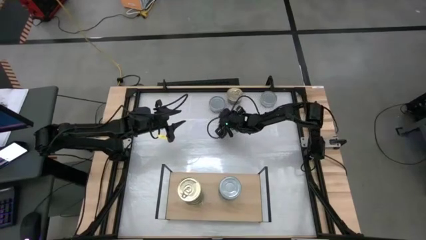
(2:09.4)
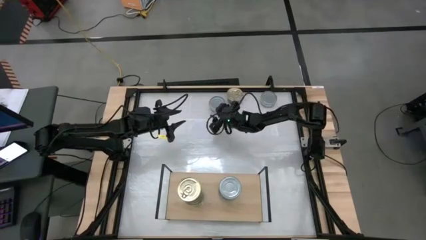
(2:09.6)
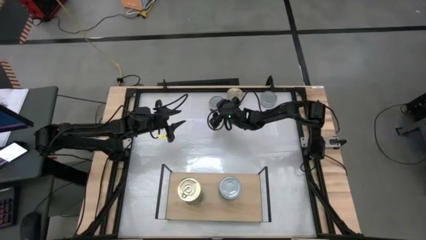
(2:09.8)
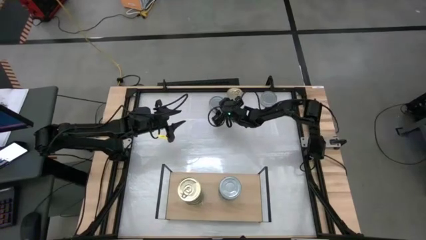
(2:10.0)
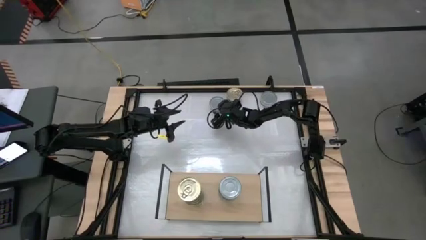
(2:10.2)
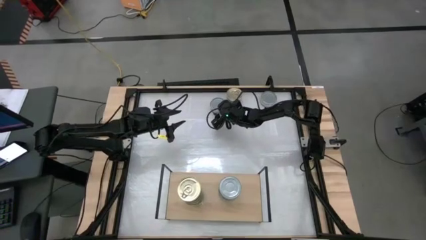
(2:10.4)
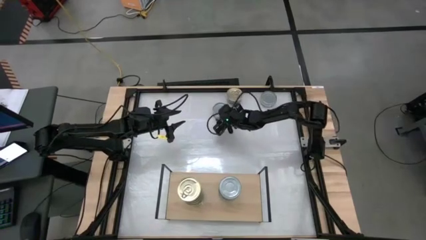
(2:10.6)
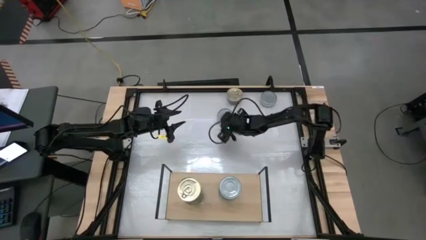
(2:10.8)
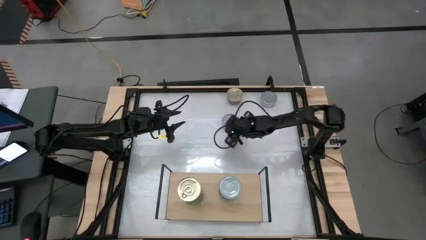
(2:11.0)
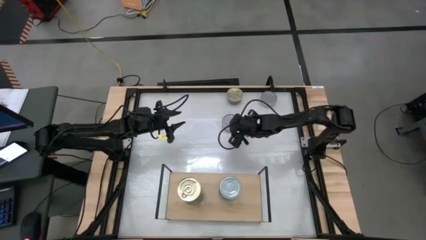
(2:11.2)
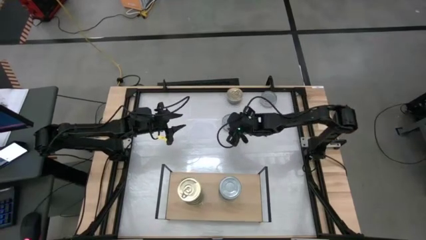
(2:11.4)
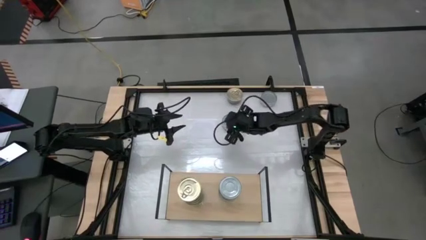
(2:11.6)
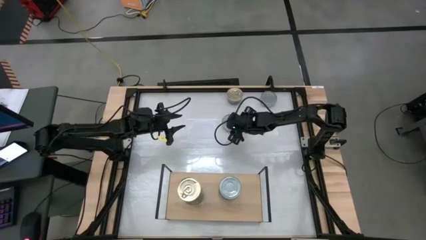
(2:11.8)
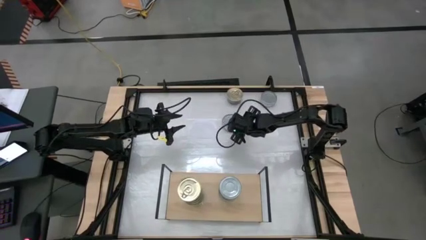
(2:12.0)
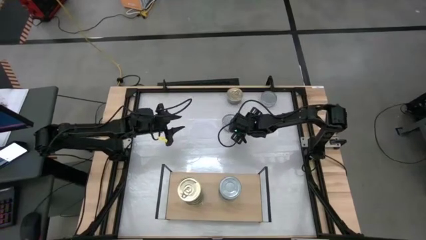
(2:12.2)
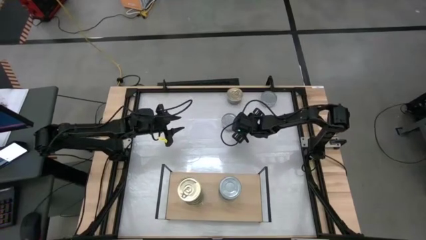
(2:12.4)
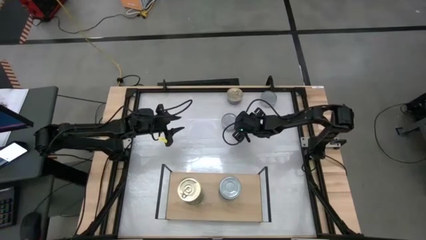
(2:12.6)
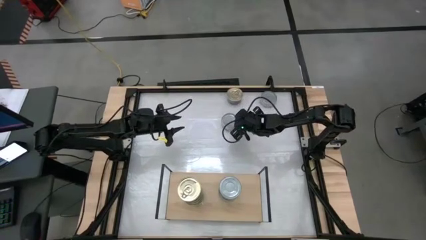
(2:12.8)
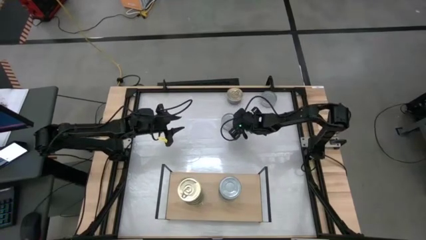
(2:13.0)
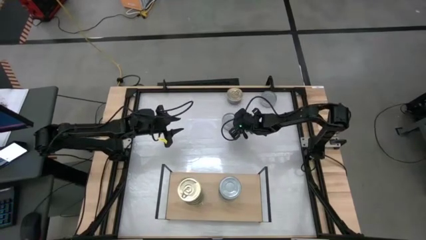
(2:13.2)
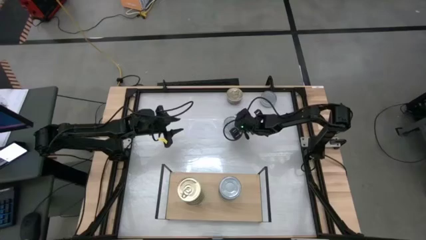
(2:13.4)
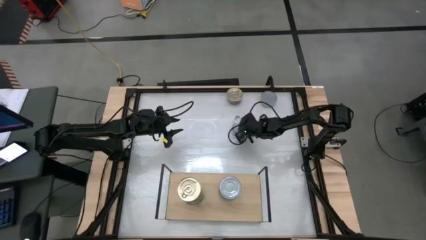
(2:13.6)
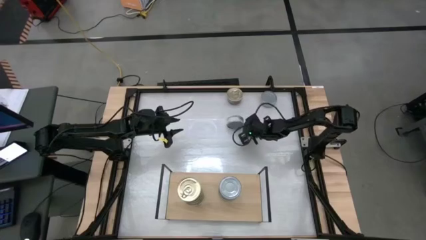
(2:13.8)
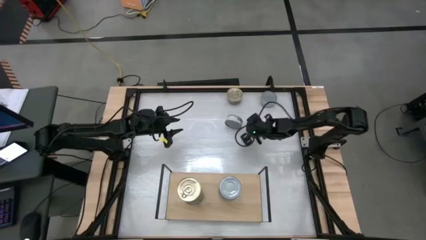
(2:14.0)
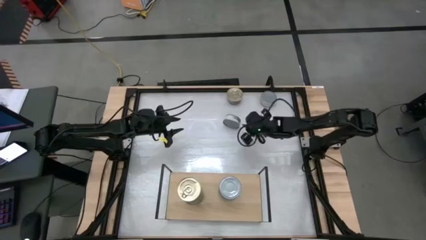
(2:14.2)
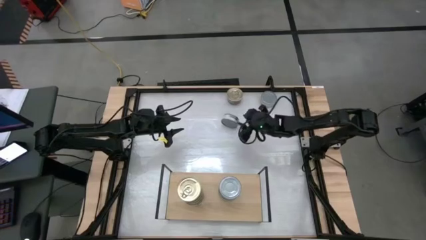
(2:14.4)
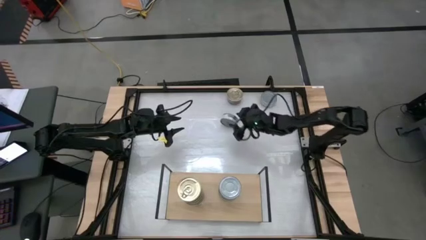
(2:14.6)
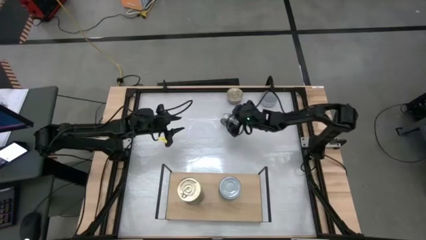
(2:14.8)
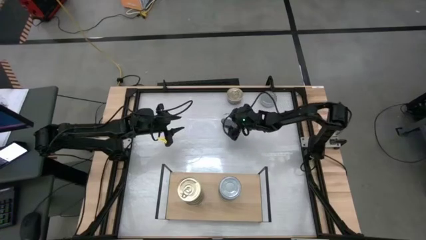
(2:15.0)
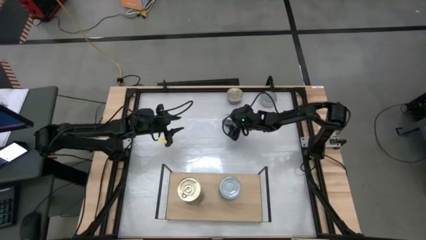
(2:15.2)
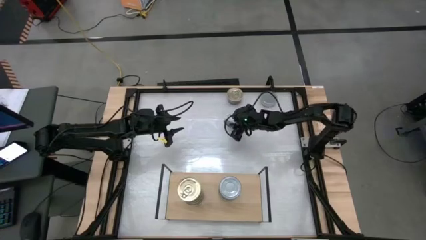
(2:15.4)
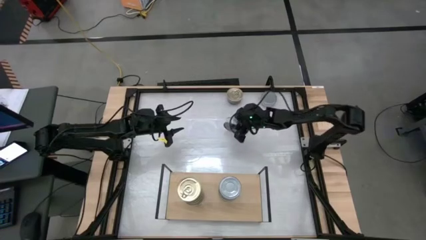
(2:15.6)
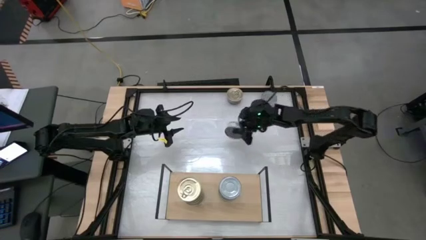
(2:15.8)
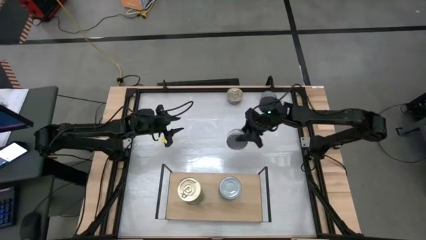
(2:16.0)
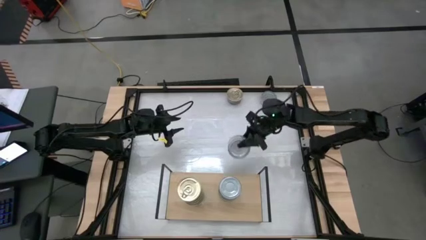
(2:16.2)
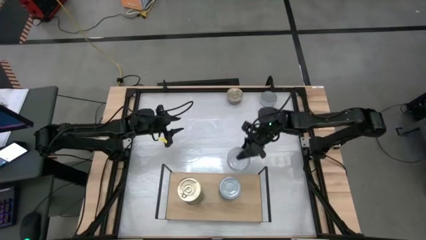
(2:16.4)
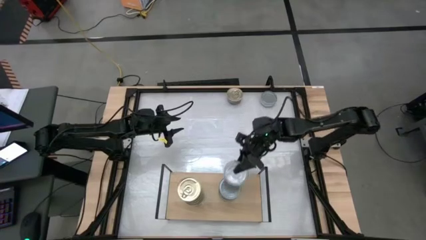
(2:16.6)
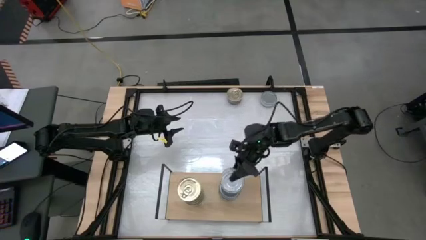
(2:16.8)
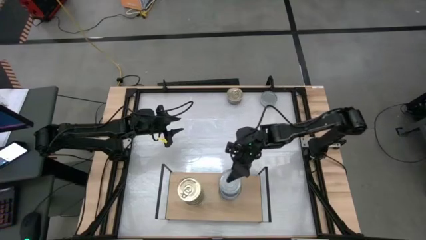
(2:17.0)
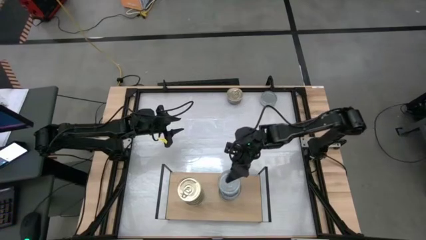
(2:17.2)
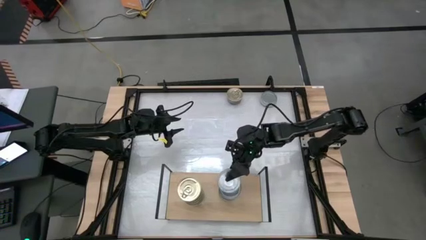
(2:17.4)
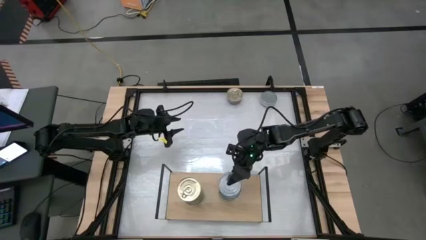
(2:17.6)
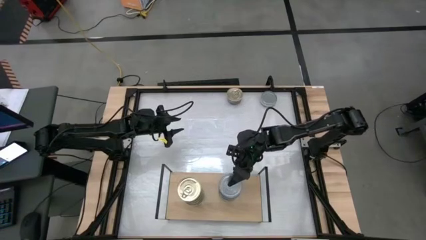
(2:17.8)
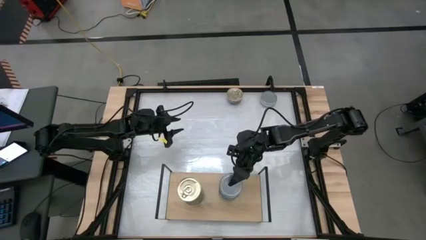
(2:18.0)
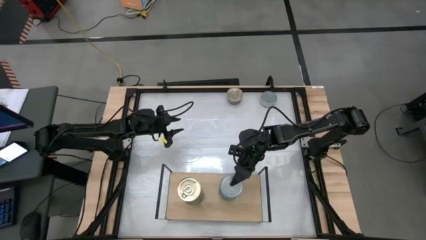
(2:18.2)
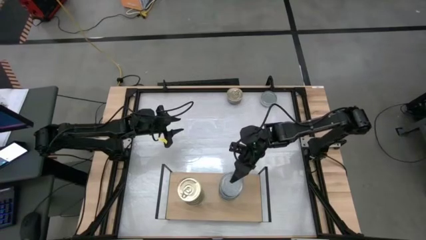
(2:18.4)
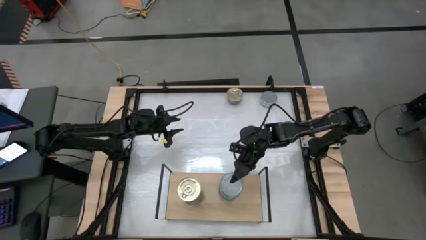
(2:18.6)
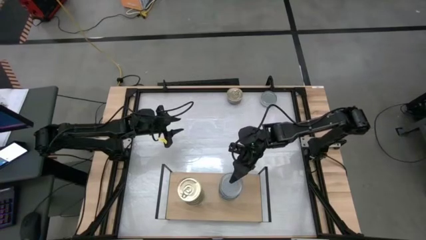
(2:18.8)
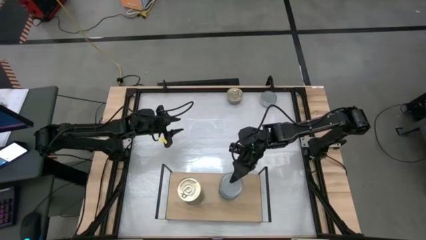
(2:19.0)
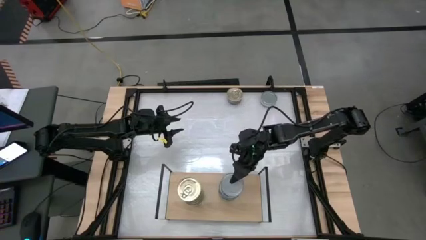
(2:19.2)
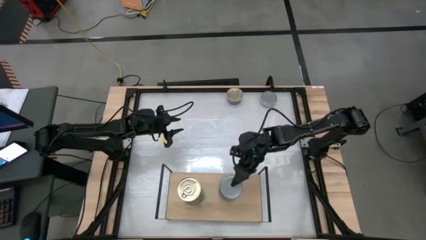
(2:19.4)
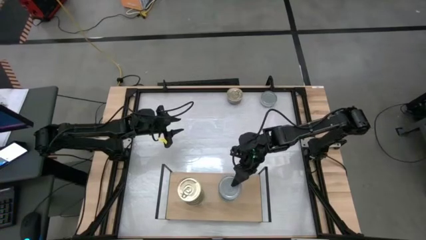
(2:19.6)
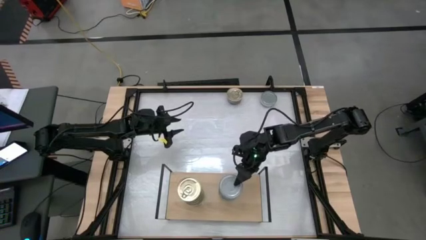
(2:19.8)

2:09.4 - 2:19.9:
Task: Stack canned seafood by type on shelf
Stack the green tuna can on top of the green tuna can on the shelf

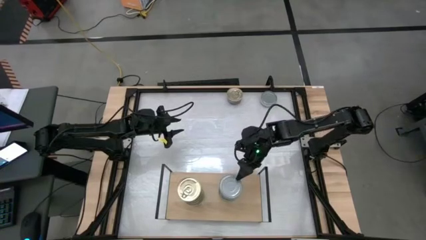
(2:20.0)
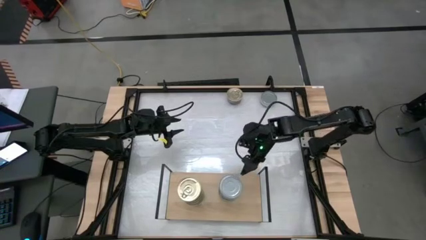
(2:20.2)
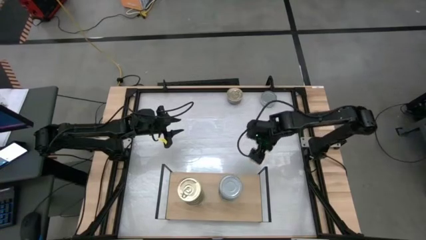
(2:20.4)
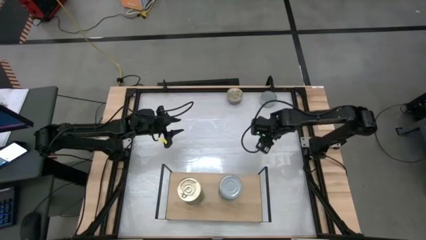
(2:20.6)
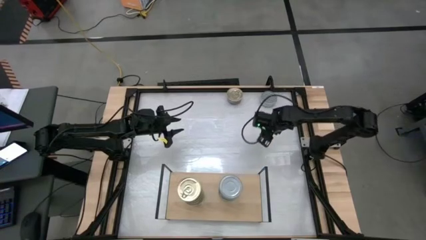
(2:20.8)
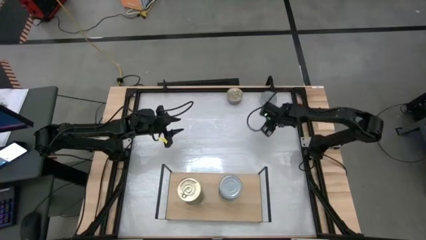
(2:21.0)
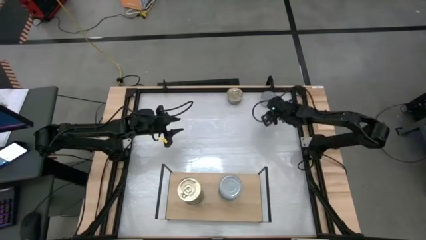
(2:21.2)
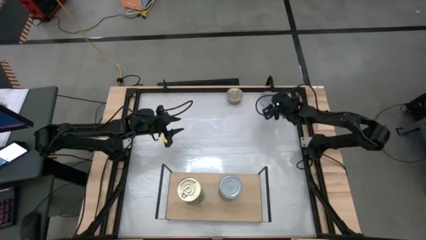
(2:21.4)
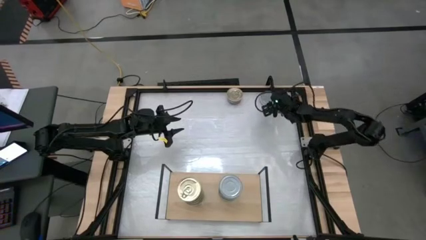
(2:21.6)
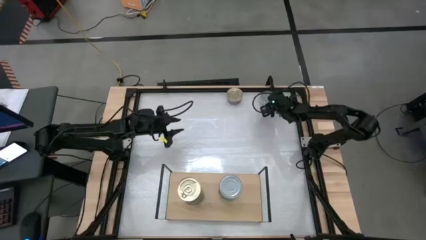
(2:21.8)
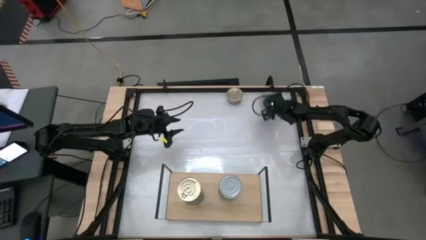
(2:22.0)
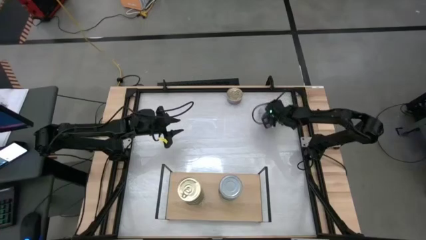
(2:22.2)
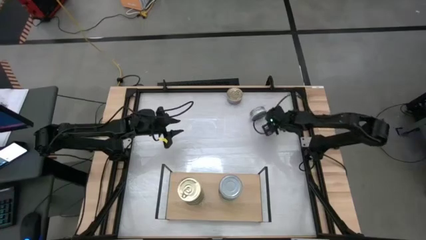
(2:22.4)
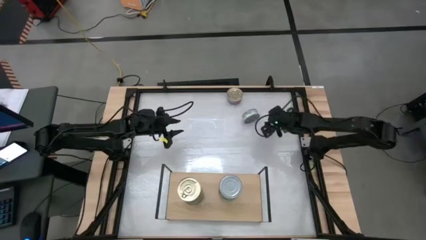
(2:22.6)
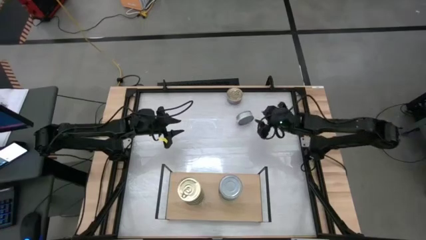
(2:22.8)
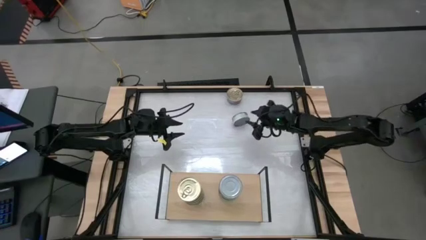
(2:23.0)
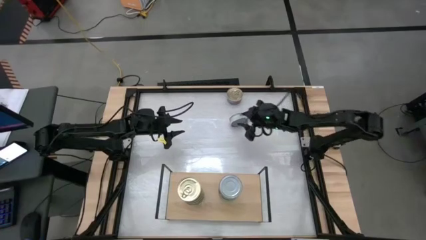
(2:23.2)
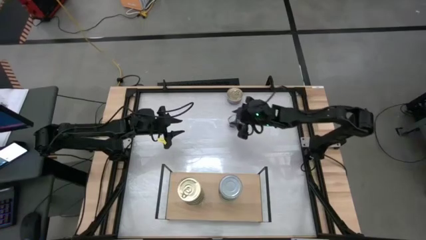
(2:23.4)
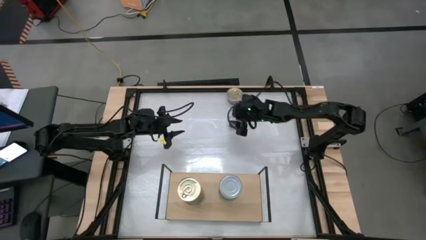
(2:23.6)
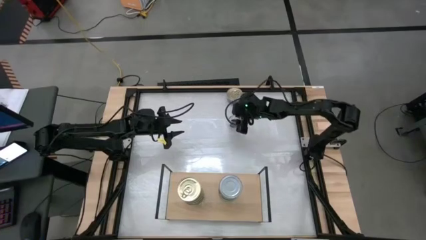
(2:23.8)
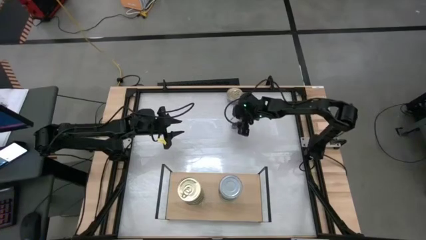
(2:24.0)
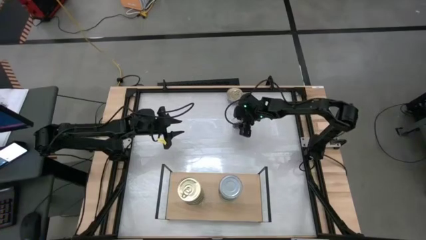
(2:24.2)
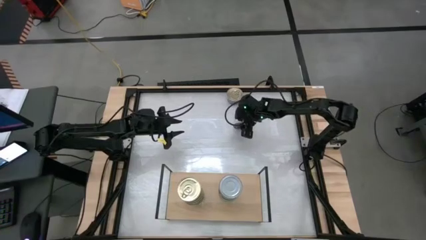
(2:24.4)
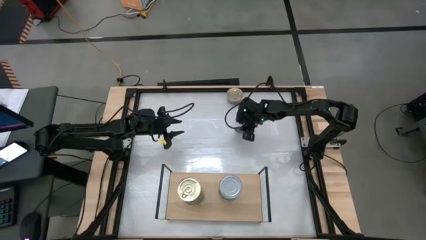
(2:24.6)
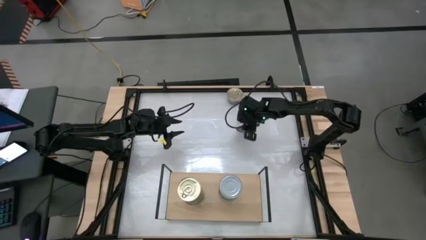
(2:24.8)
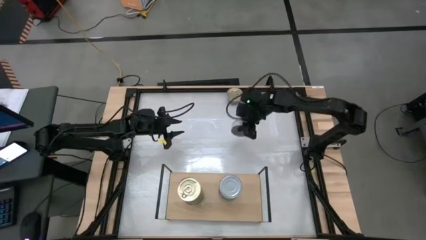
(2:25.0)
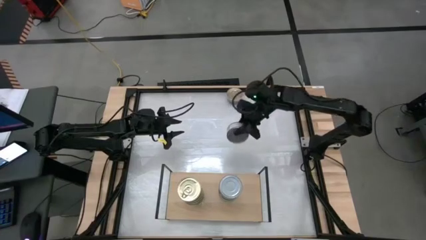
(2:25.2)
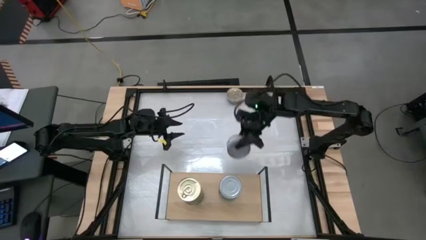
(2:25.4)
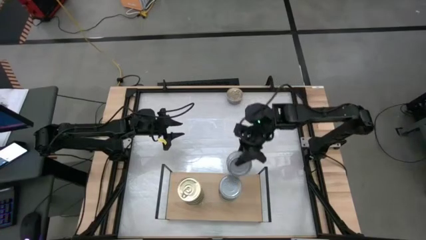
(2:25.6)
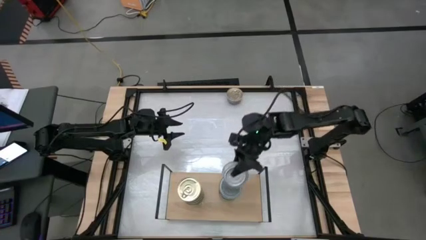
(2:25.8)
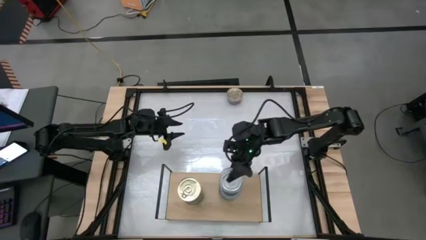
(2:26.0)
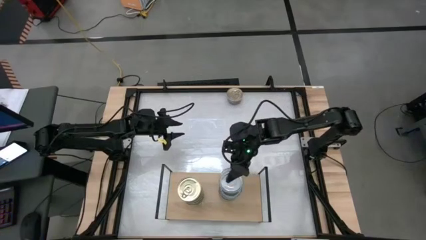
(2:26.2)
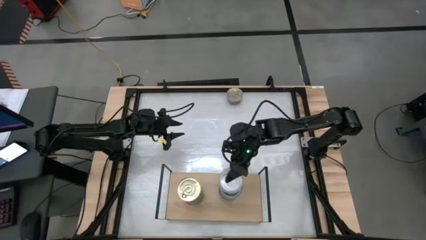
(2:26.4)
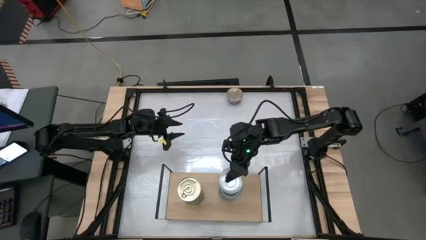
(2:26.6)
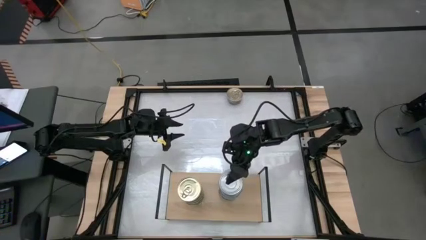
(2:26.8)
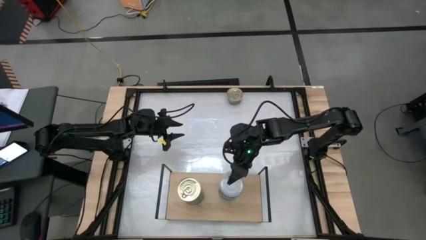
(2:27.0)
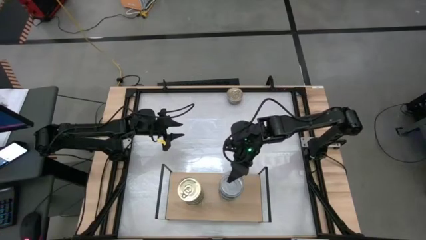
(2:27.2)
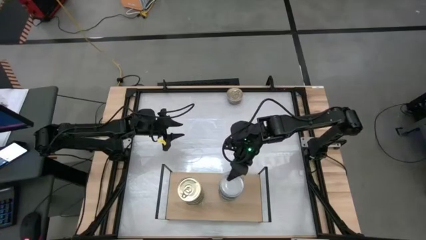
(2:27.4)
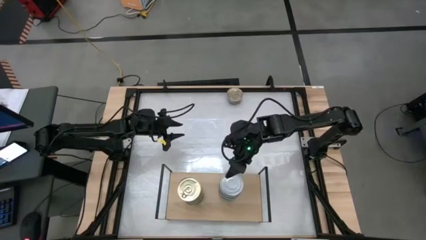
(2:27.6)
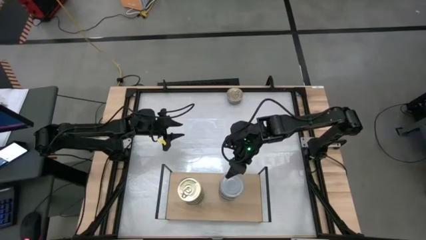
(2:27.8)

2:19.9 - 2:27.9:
Stack the green tuna can on top of the green tuna can on the shelf
